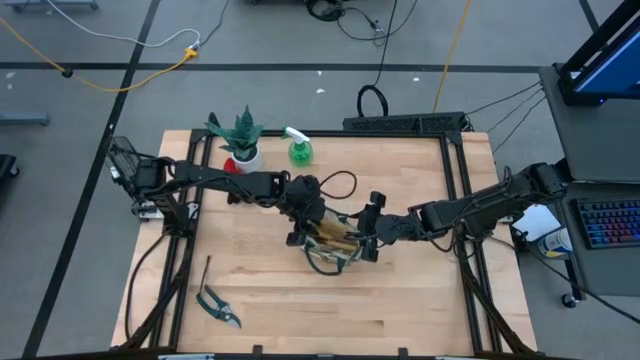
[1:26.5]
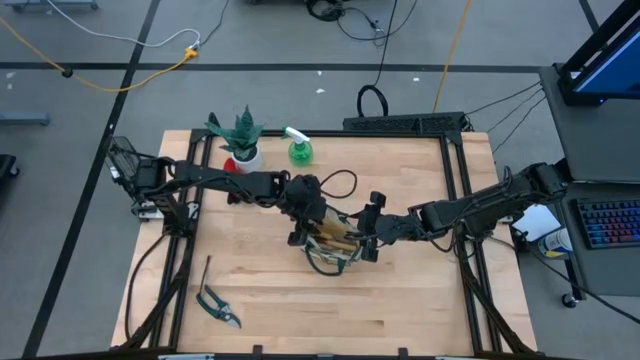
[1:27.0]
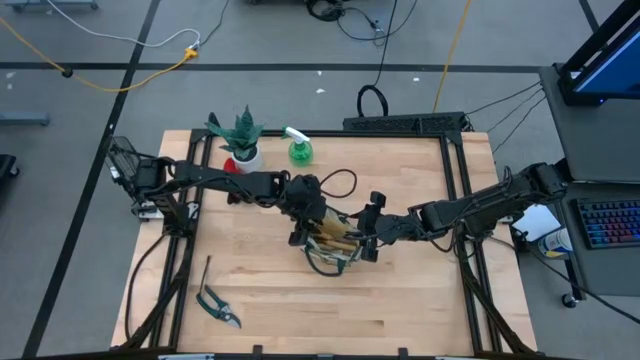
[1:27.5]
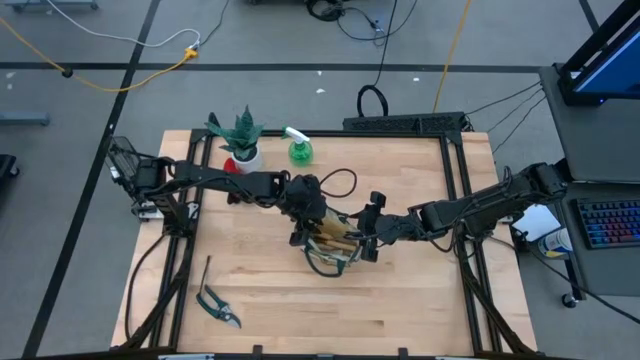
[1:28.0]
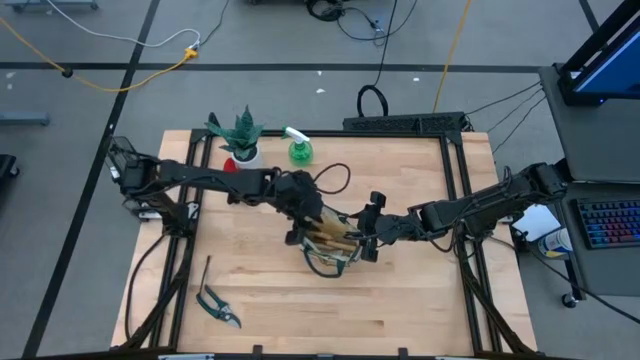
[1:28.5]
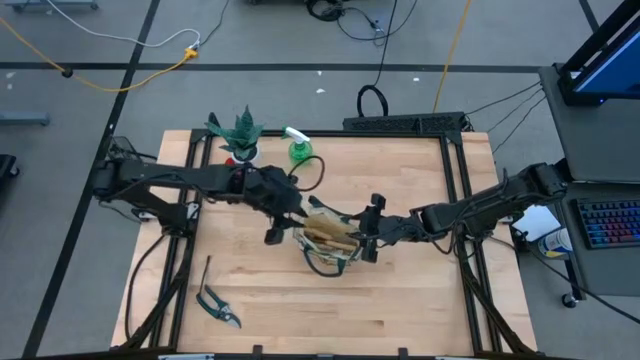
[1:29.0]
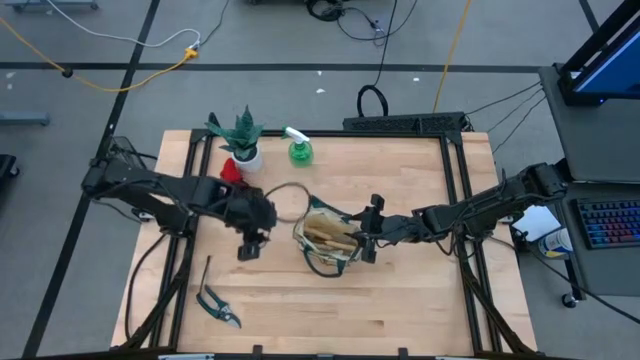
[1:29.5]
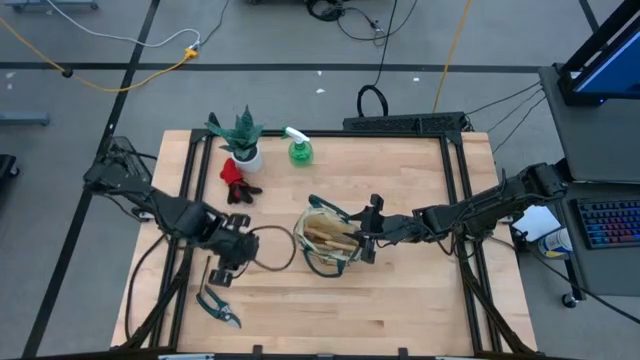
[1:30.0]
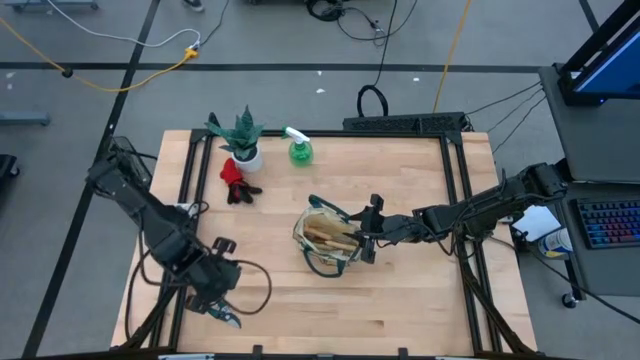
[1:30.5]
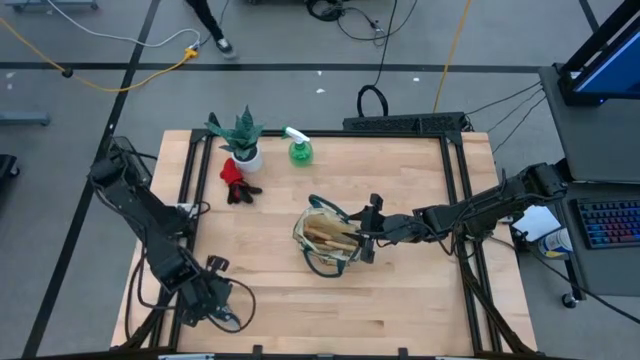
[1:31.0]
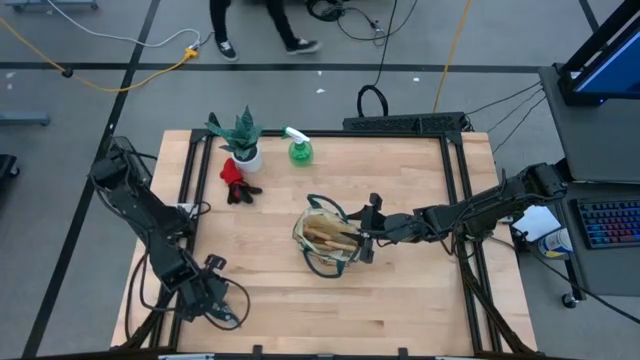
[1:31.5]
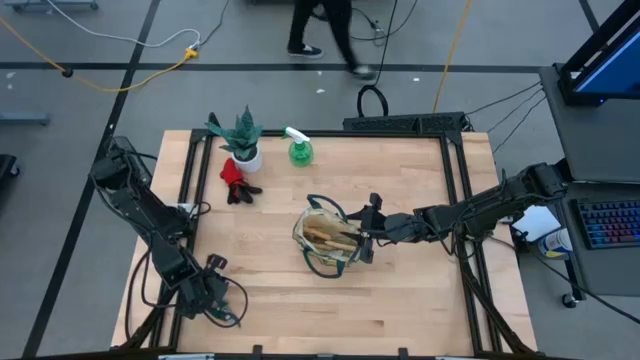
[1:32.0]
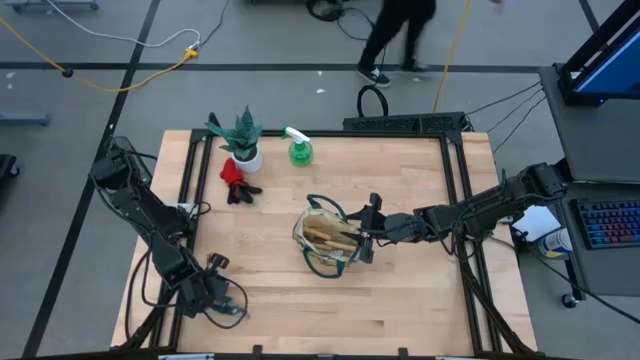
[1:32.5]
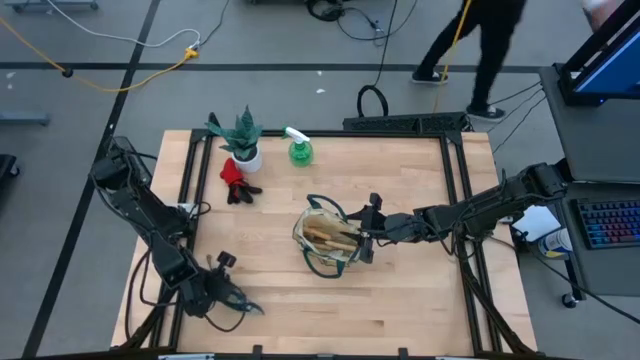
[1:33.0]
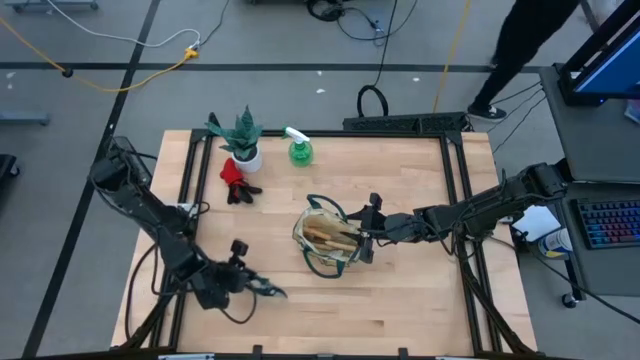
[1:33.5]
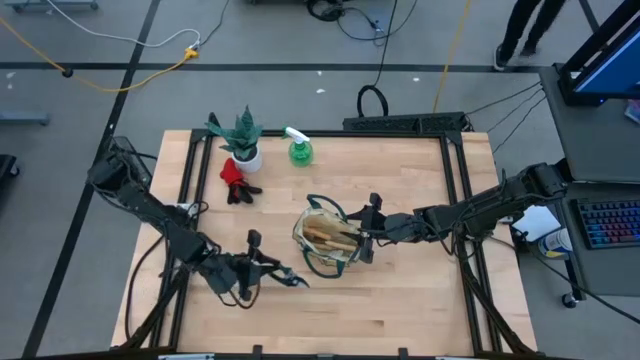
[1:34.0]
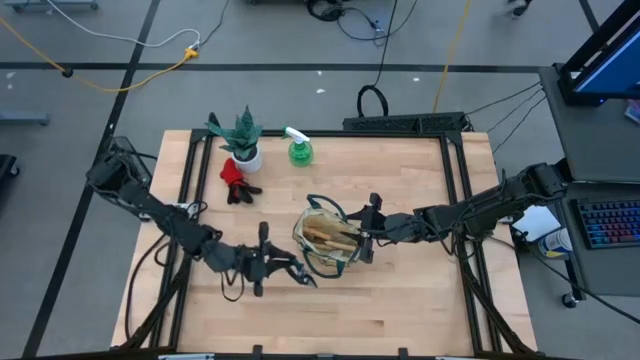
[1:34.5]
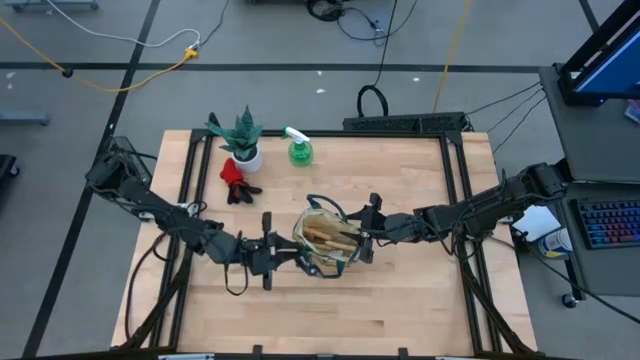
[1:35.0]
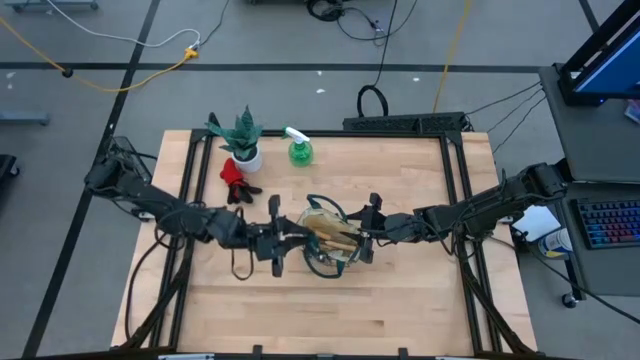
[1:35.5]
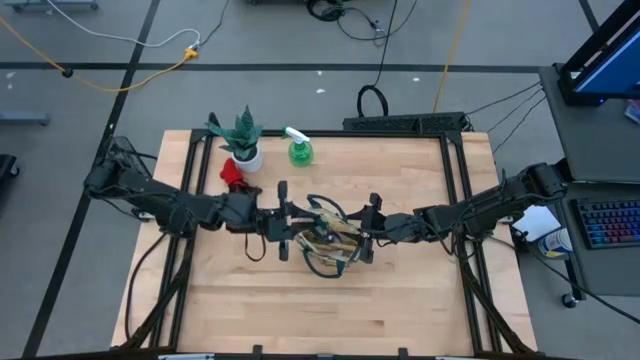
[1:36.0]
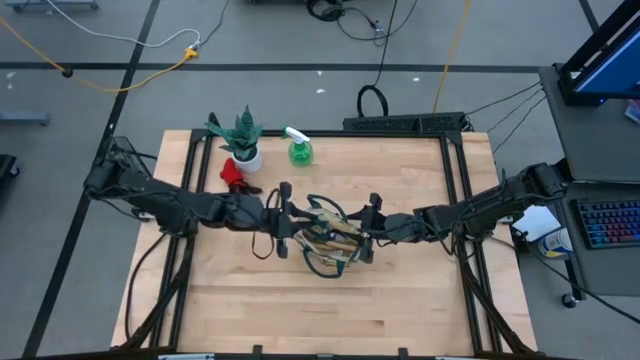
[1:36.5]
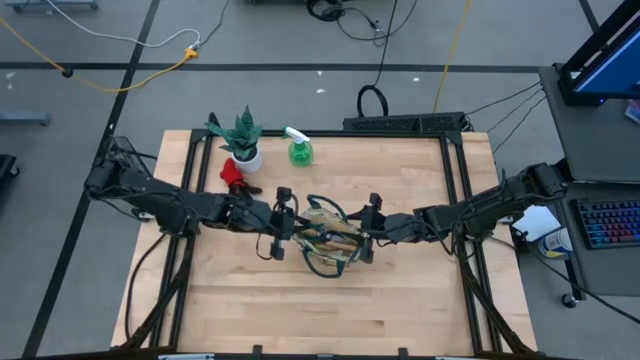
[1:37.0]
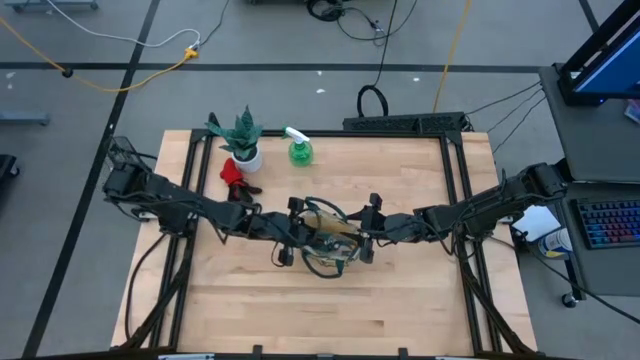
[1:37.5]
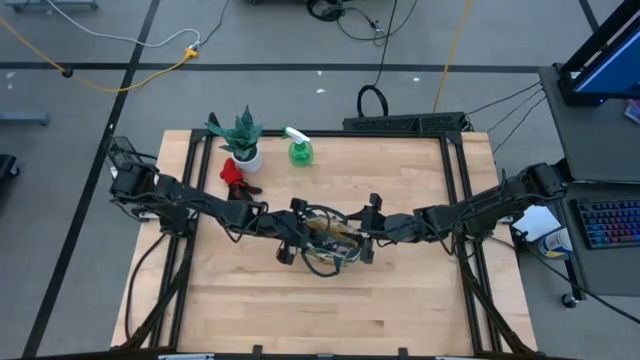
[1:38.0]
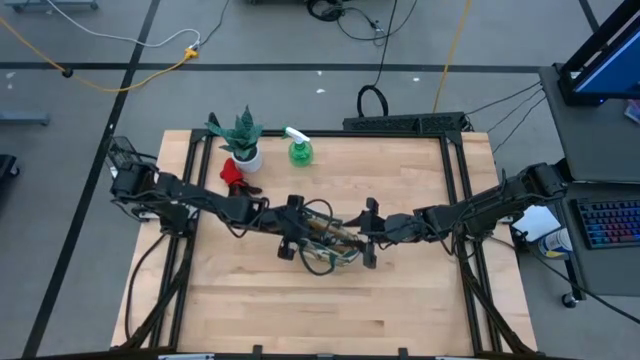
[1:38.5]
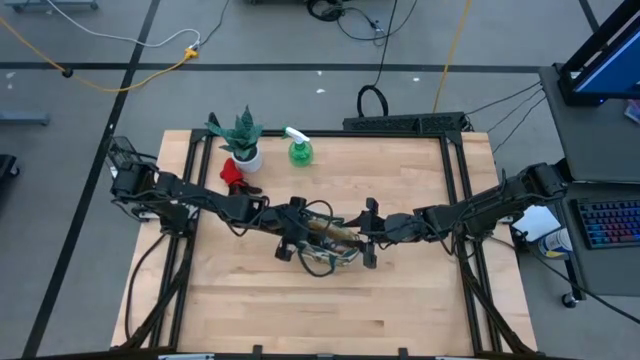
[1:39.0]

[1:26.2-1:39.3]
Task: Pick & Place Garden tools in Gardening bag
Put the dark green scissors into the gardening bag

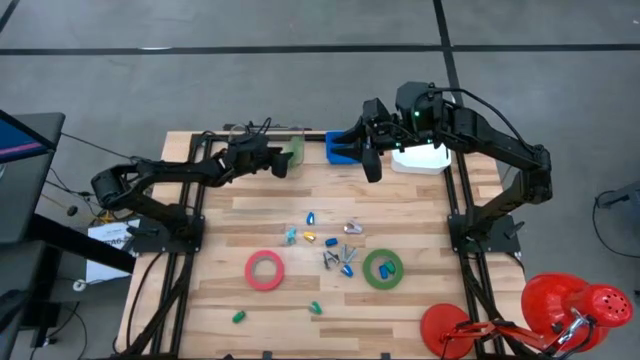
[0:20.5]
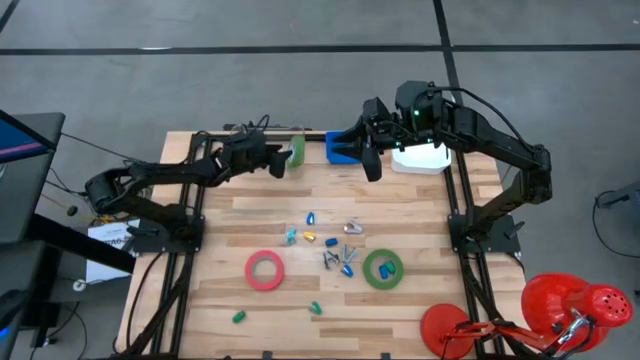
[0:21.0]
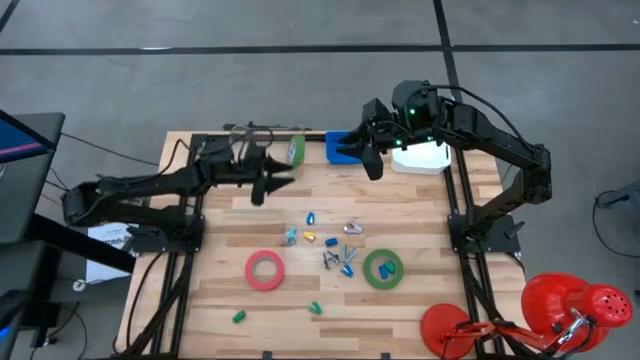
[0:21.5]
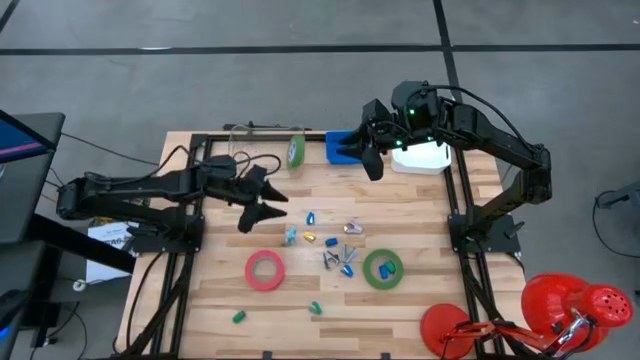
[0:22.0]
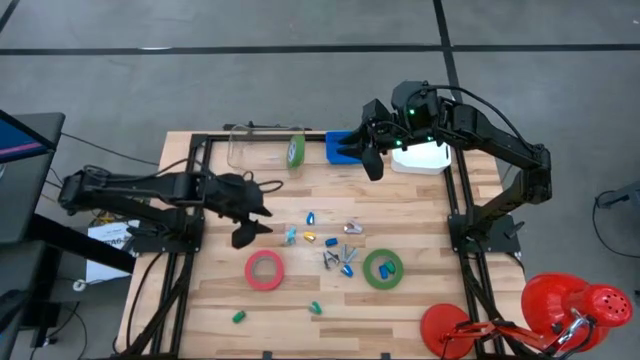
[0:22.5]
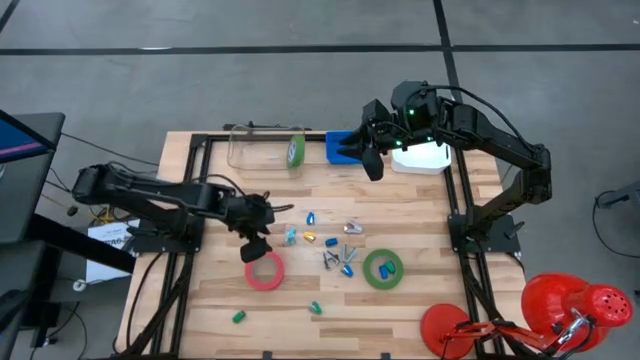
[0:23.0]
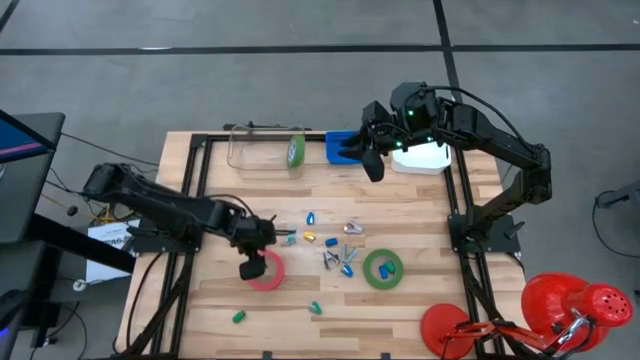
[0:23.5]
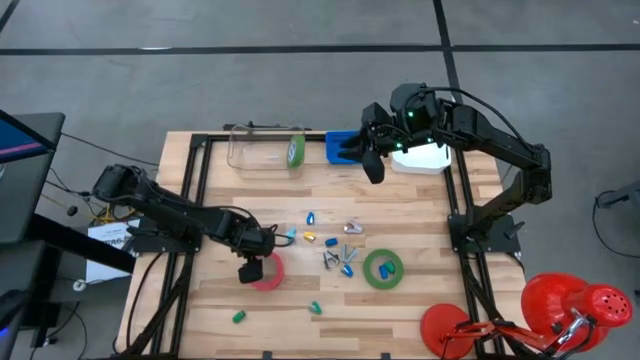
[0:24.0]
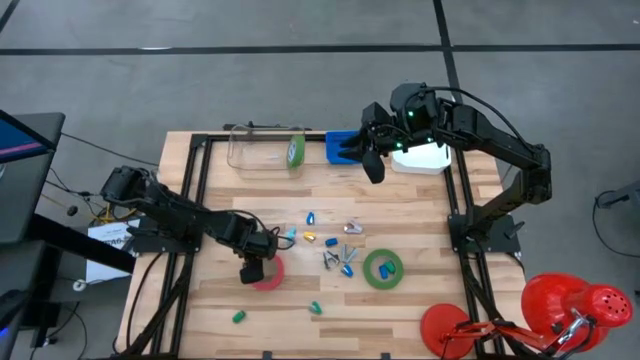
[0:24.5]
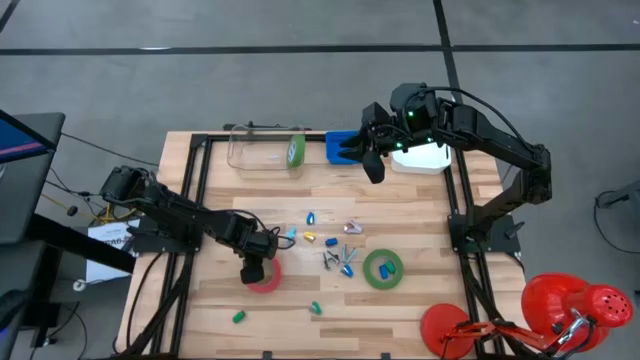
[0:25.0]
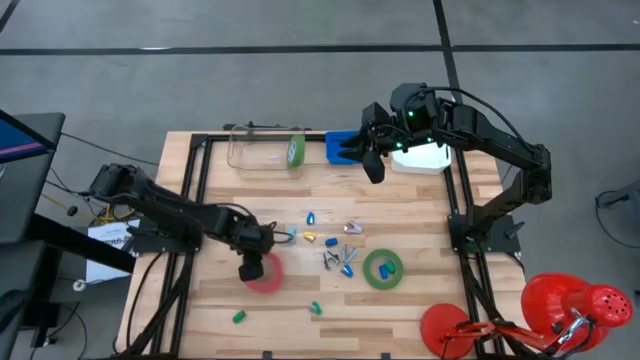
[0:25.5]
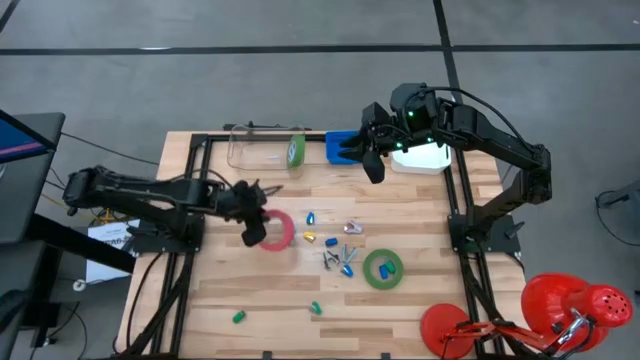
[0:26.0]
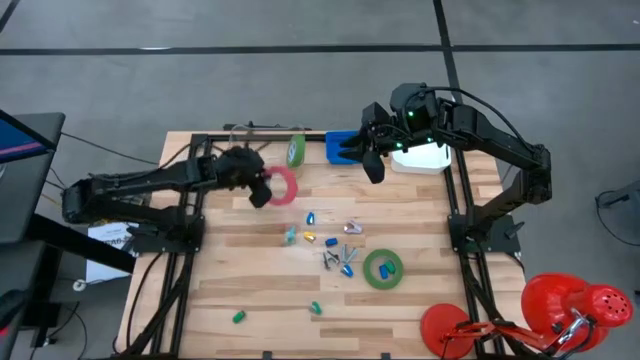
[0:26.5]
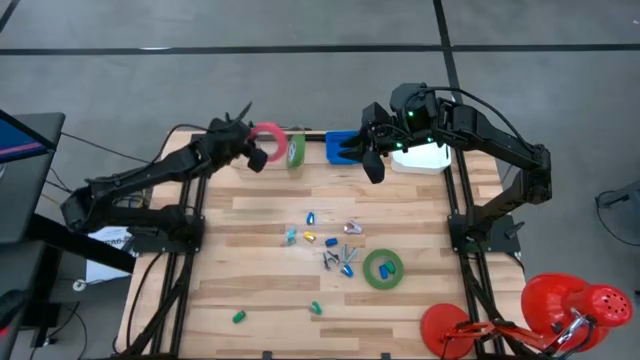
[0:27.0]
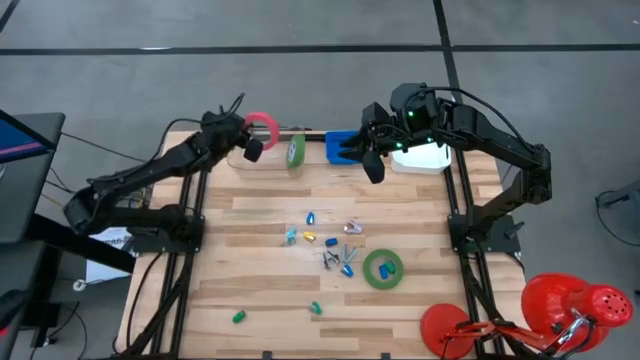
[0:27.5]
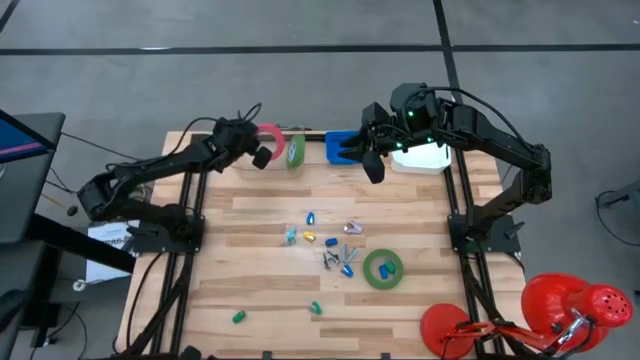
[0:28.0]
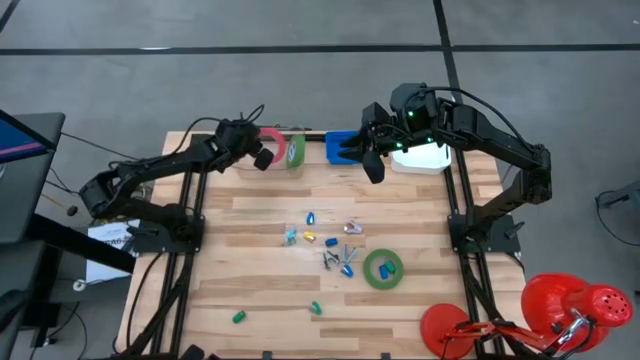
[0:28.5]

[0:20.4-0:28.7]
Task: Pick and place Stapler, Stapler remover, tape
Put the pink tape into the transparent bin
